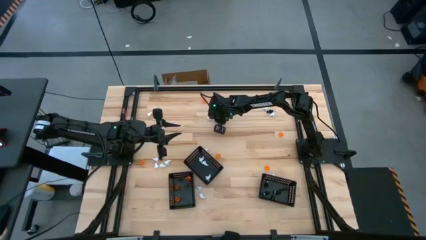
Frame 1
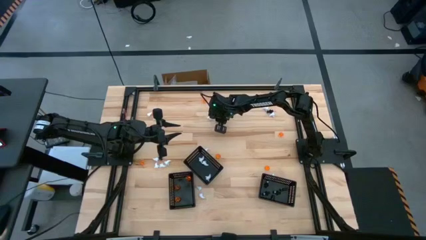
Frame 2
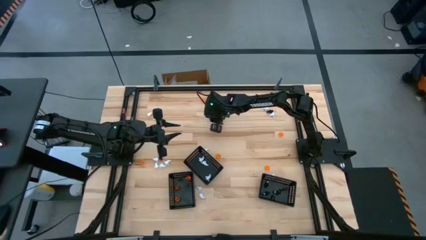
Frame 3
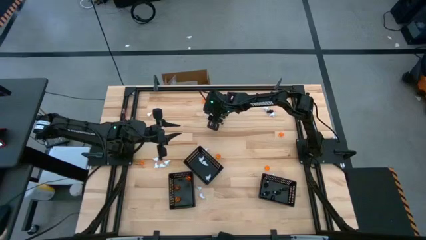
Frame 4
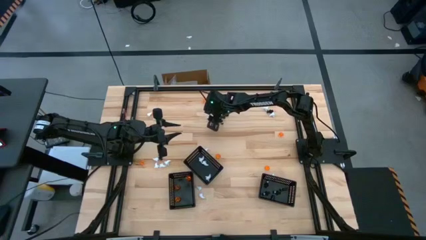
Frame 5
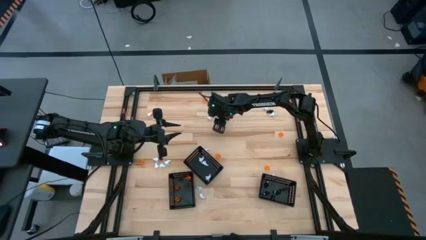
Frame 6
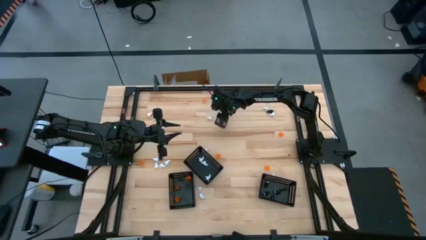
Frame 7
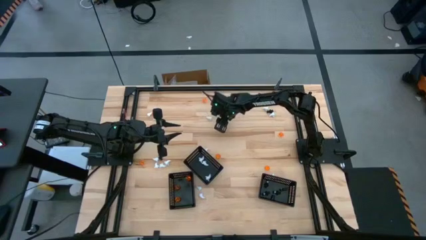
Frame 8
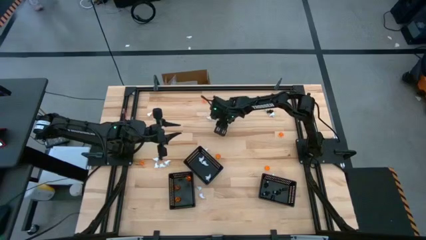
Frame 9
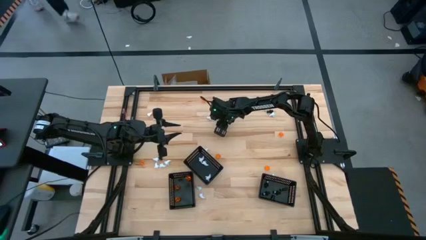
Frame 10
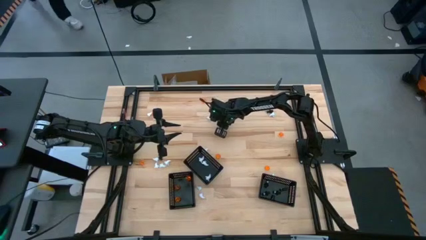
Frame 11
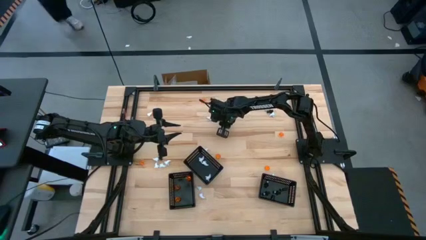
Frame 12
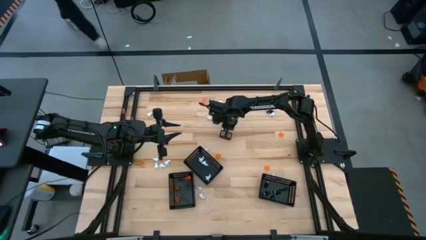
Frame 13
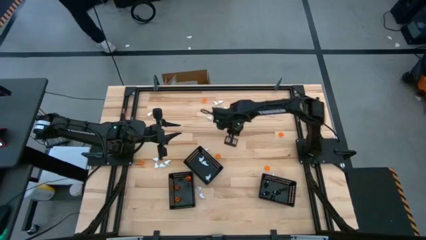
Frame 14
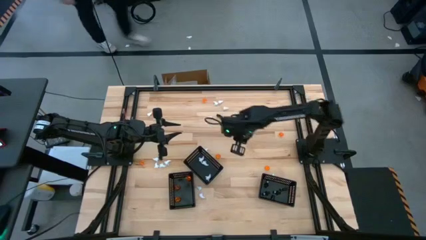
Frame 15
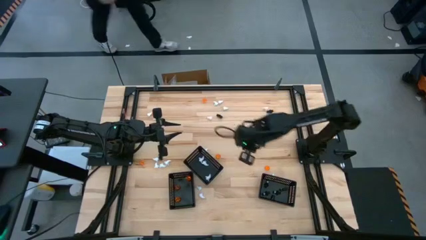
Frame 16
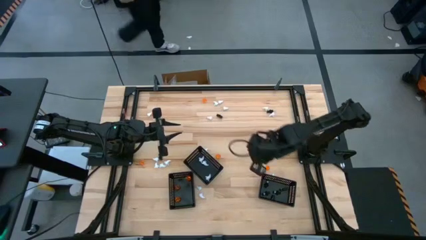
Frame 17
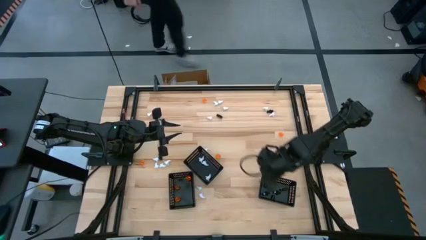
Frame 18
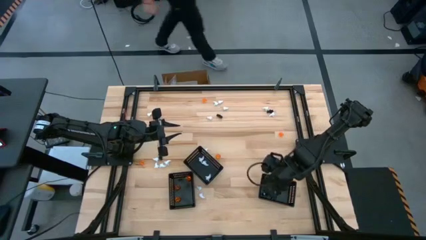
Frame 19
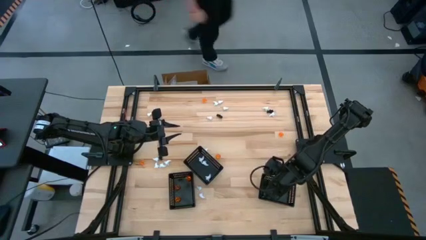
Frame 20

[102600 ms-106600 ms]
Task: Sort Halloween decoration
Put the black skeleton toy into the right black basket

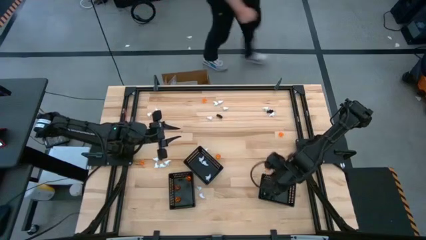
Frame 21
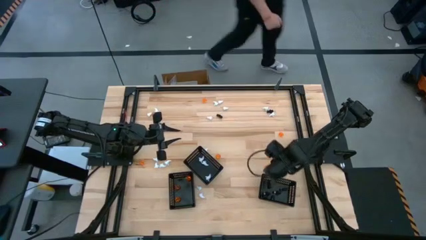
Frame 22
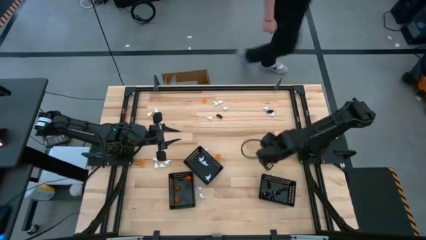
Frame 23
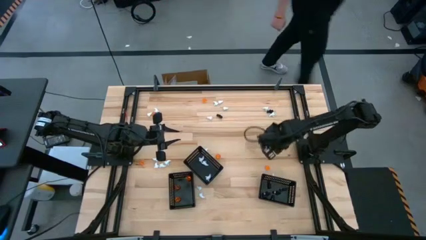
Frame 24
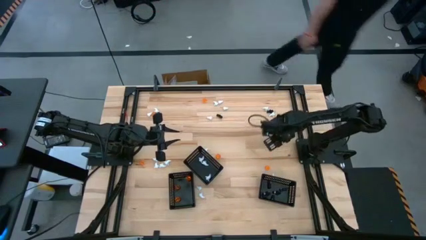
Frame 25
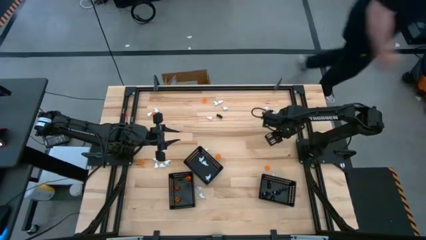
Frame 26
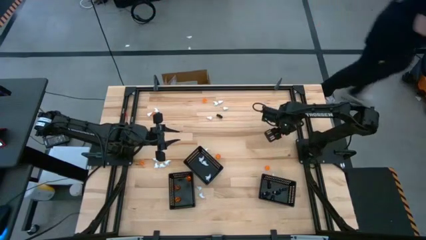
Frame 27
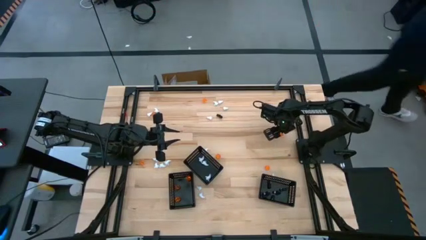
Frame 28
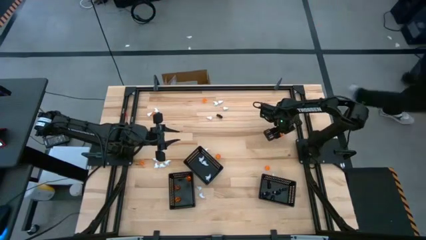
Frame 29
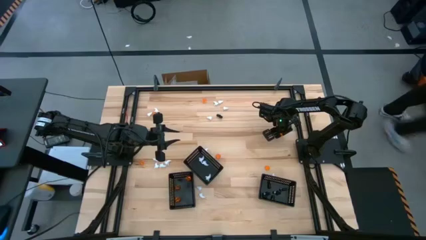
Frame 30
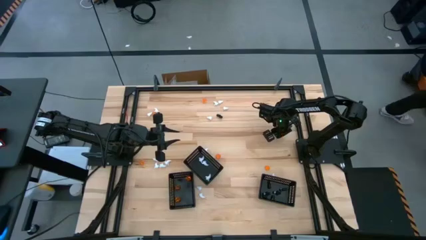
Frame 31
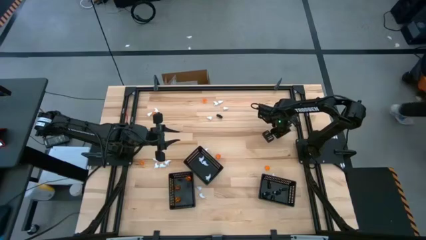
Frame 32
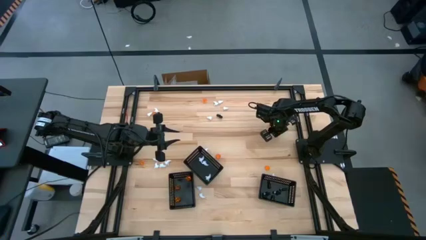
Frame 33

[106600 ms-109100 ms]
Put the orange pumpkin toy into the left black basket

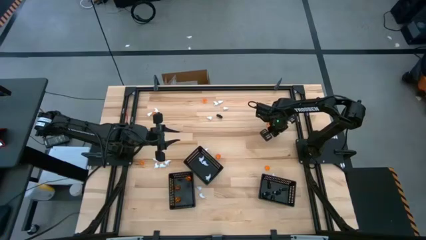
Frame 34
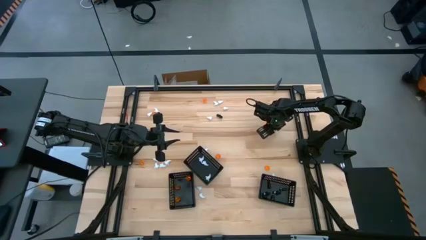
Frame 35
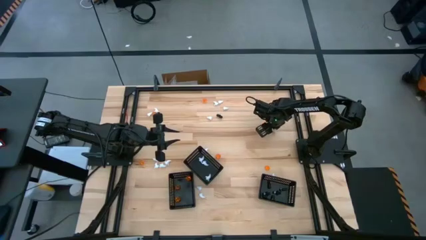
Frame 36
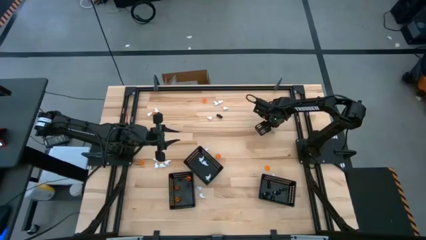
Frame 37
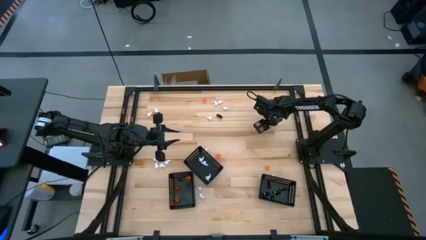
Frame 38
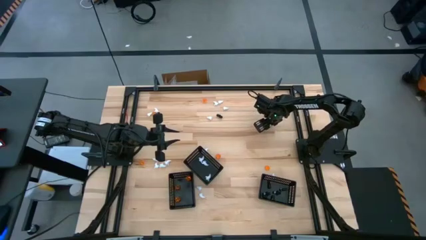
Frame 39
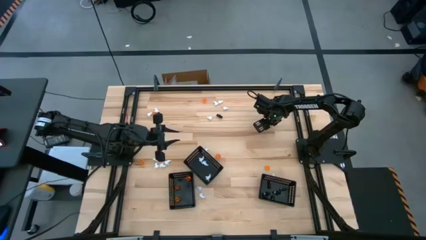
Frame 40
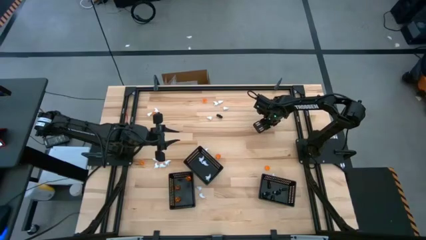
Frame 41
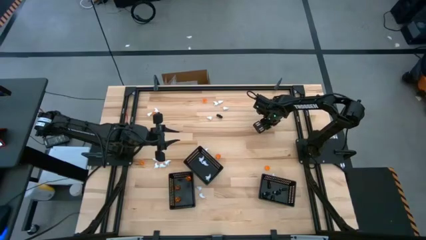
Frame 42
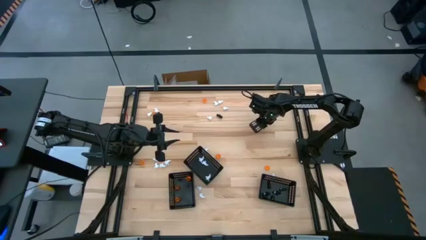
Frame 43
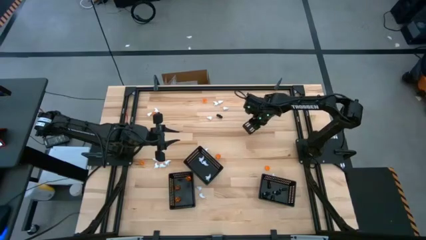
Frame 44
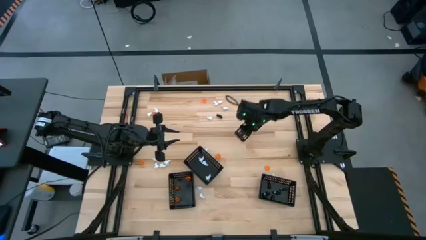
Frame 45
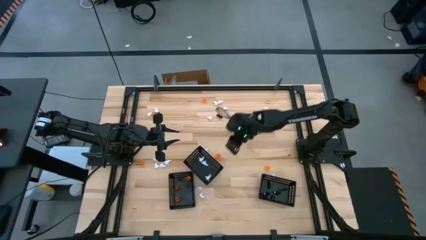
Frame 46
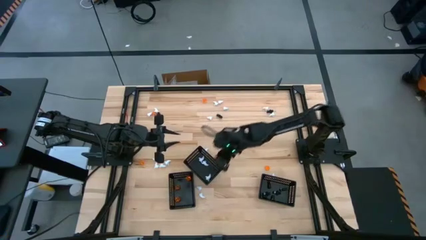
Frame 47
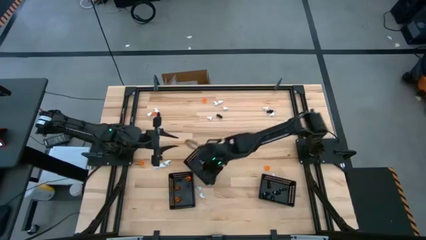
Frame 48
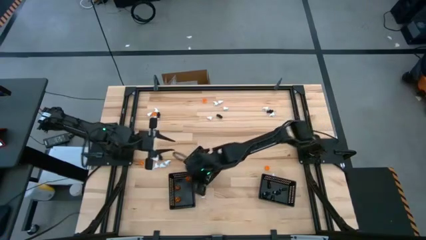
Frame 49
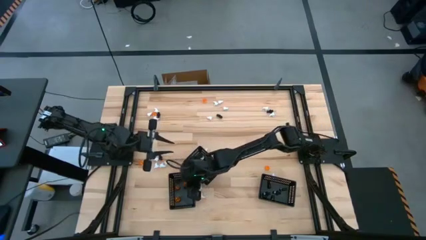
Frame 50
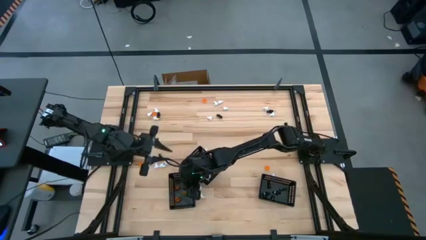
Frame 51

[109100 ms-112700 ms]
Put the orange pumpkin toy into the left black basket

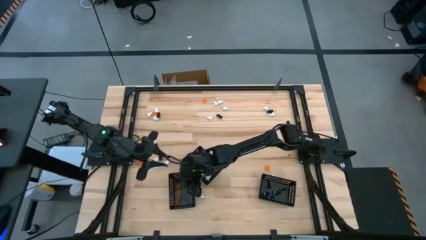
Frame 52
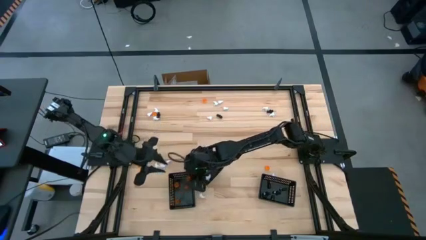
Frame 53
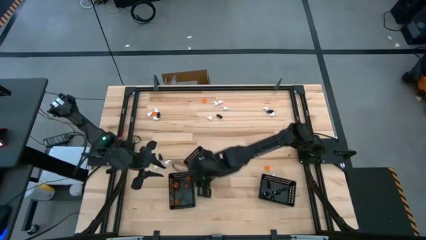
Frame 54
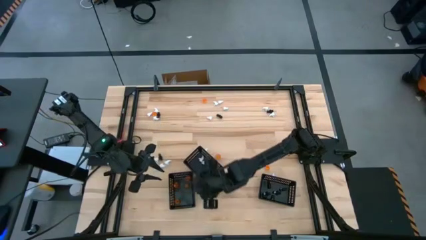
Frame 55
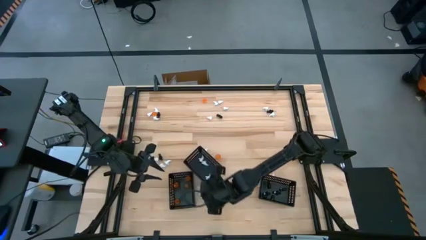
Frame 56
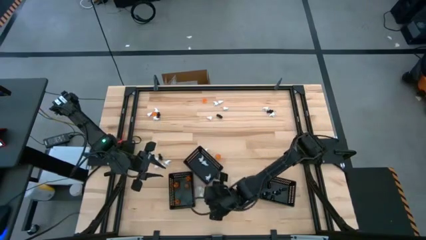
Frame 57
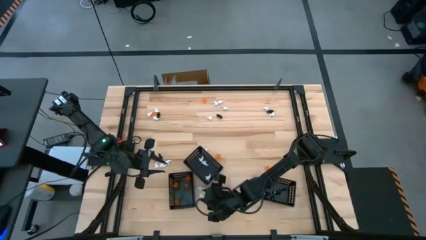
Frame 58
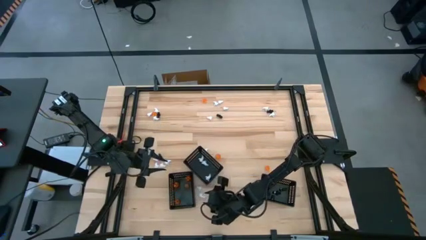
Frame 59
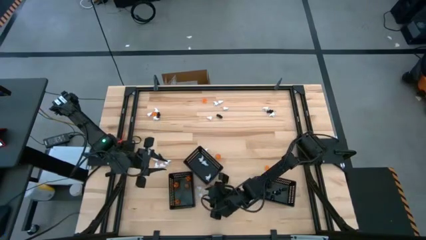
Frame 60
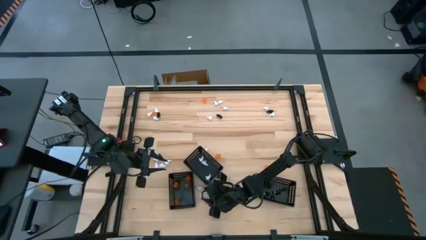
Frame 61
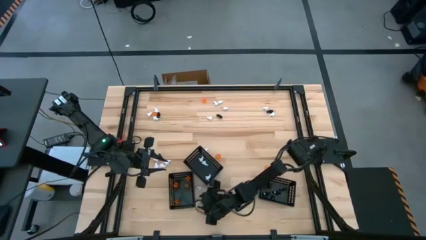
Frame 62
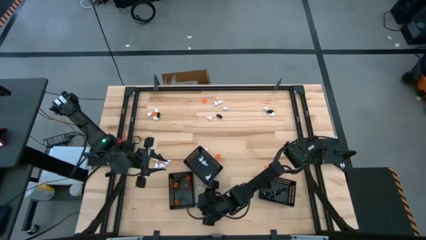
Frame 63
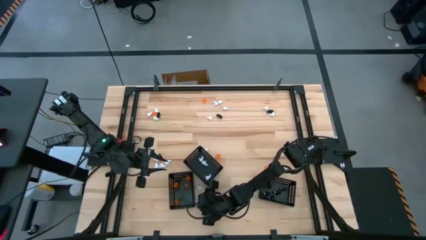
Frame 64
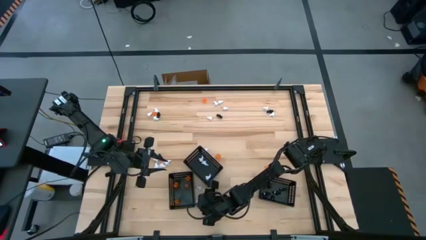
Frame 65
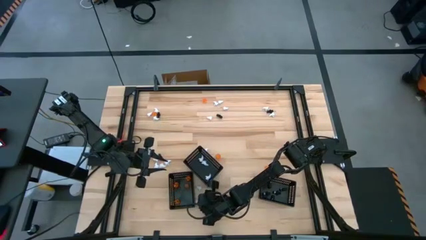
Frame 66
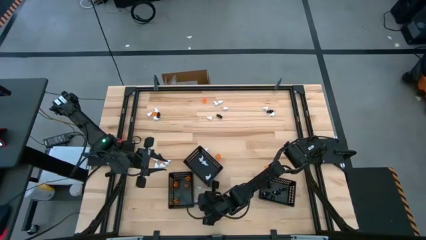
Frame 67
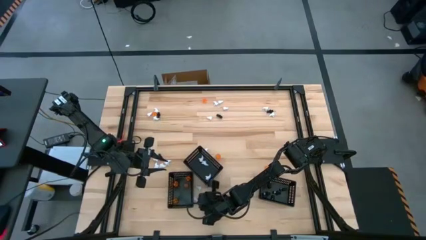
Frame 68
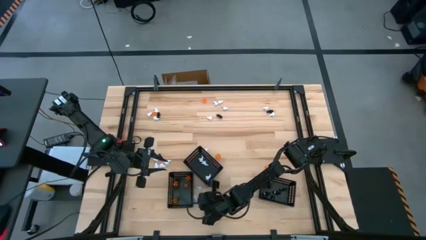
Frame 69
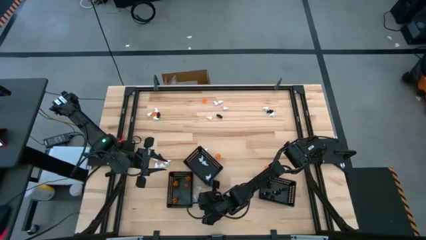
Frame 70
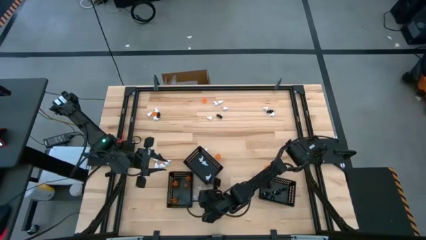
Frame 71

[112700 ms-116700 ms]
Put the white ghost toy into the middle black basket

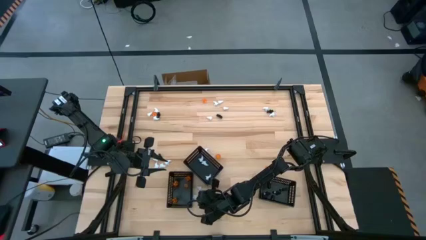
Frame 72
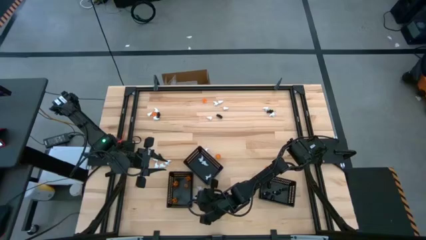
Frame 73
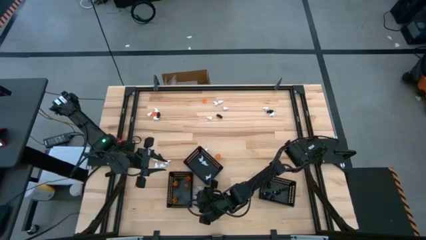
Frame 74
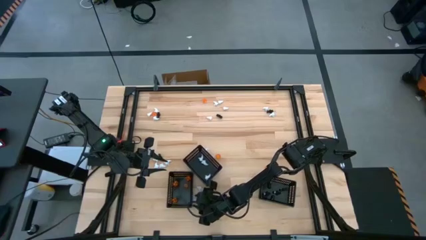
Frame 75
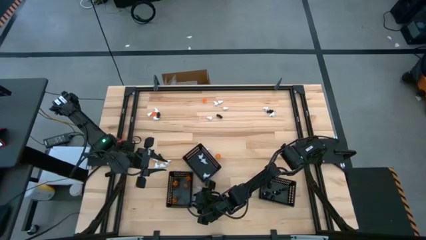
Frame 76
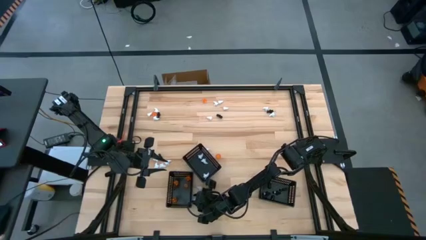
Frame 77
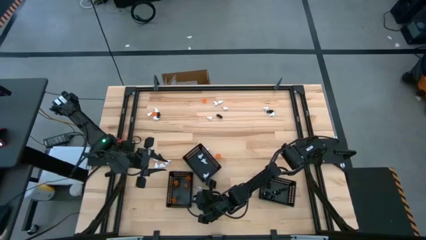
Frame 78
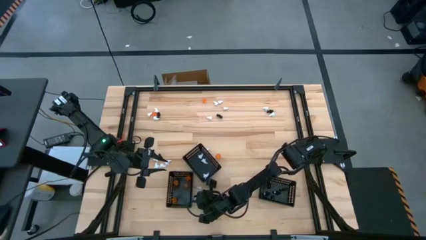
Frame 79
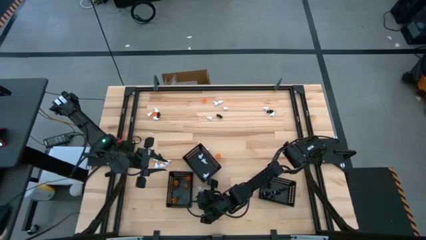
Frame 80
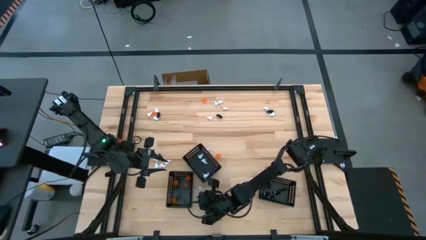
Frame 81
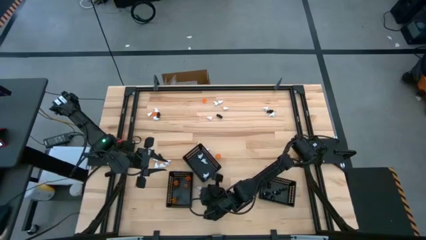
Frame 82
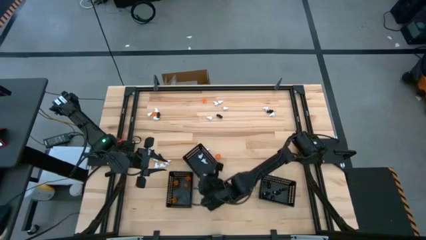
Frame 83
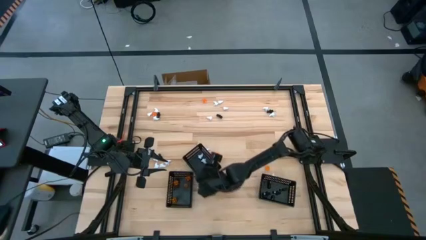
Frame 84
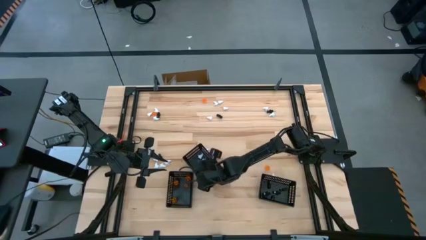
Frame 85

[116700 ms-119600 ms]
Put the white ghost toy into the middle black basket
